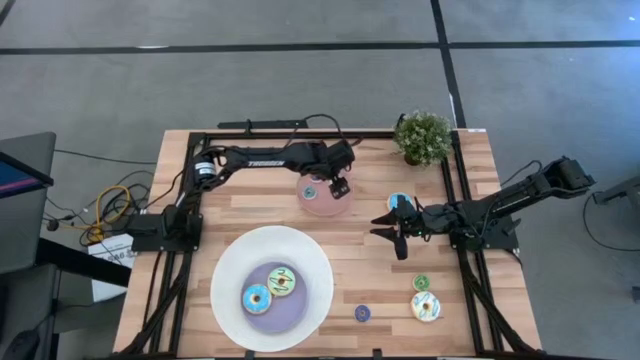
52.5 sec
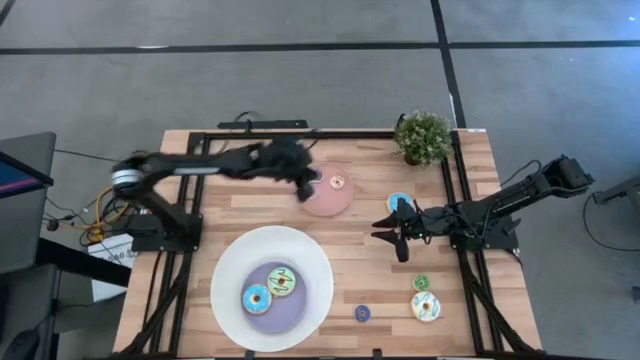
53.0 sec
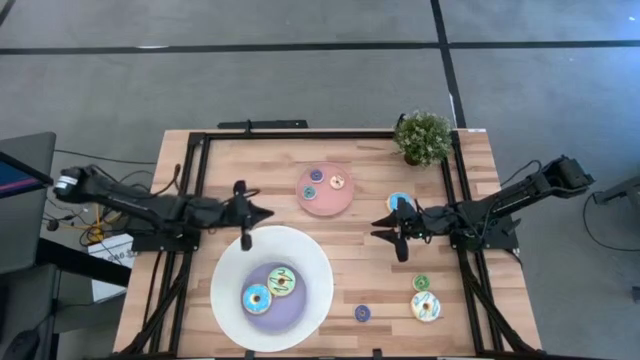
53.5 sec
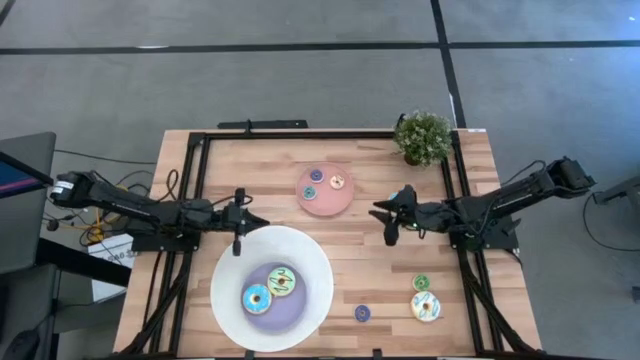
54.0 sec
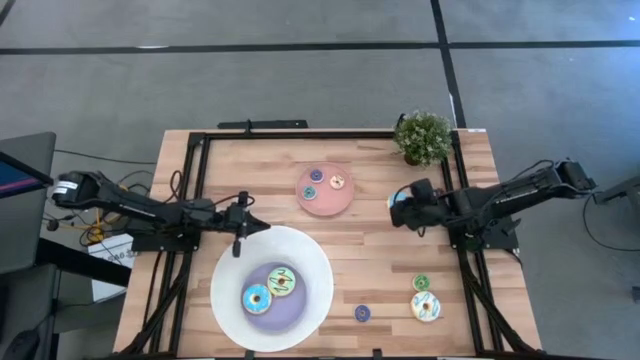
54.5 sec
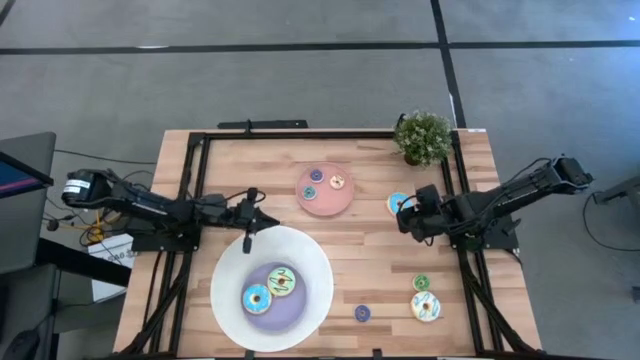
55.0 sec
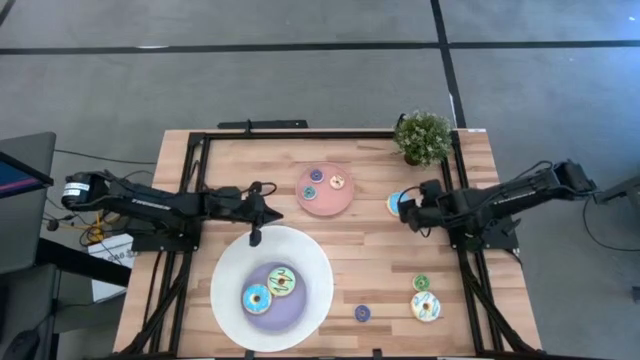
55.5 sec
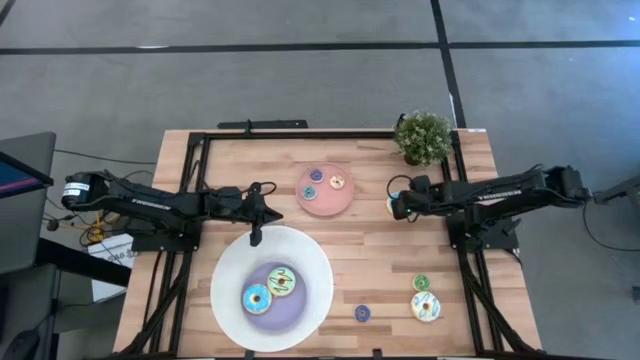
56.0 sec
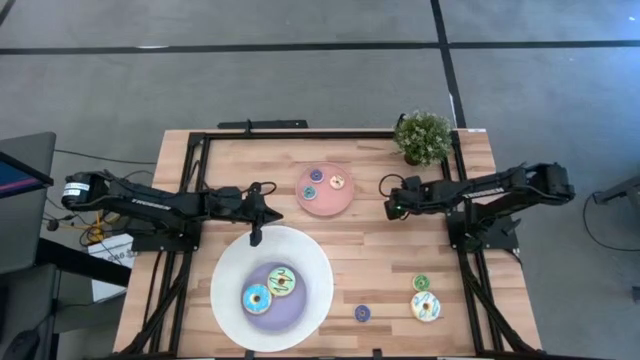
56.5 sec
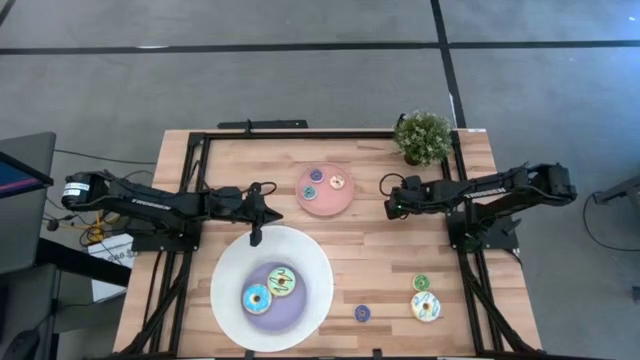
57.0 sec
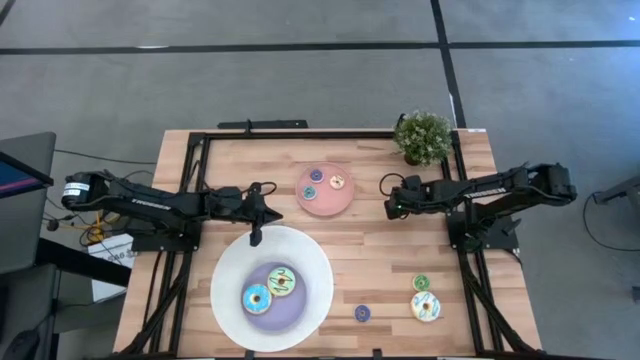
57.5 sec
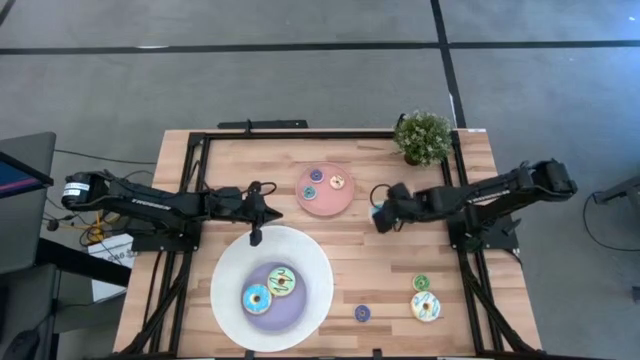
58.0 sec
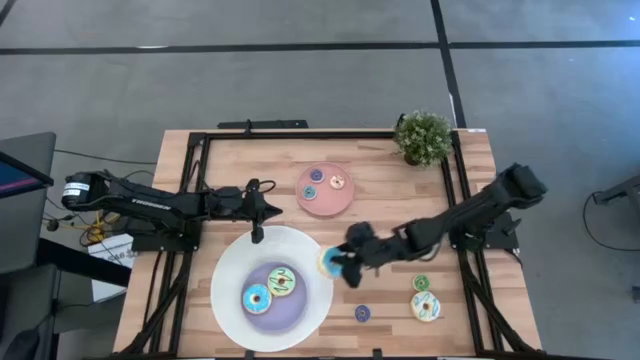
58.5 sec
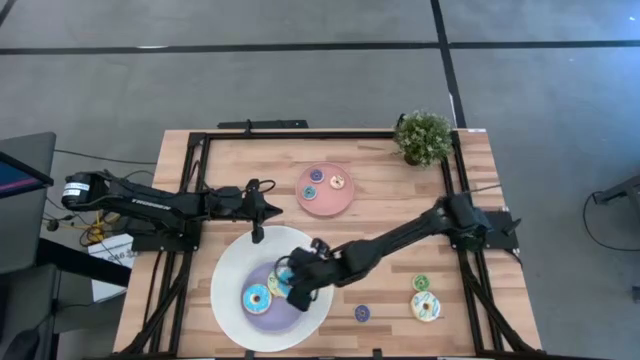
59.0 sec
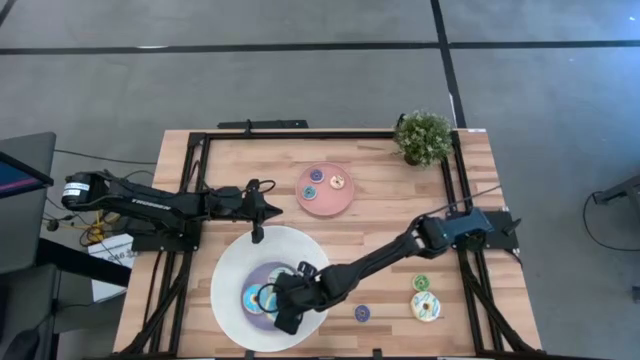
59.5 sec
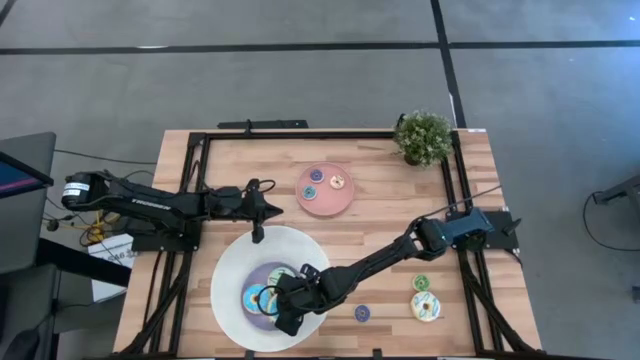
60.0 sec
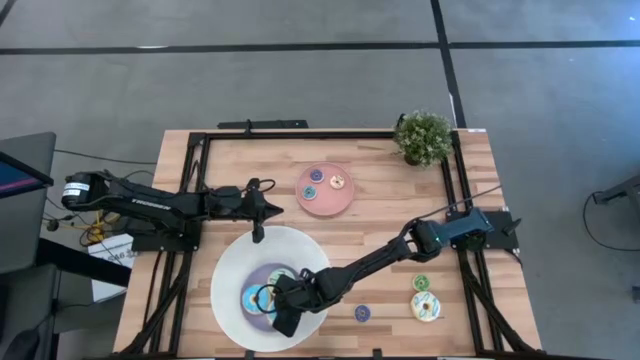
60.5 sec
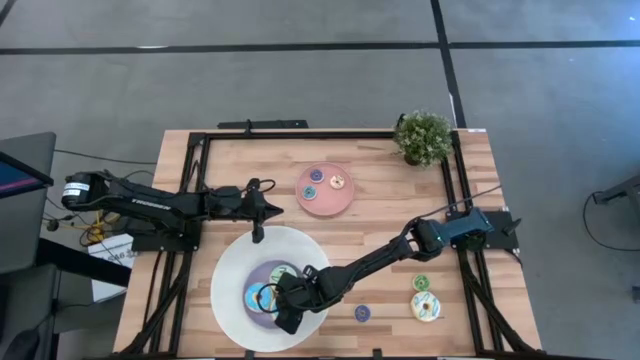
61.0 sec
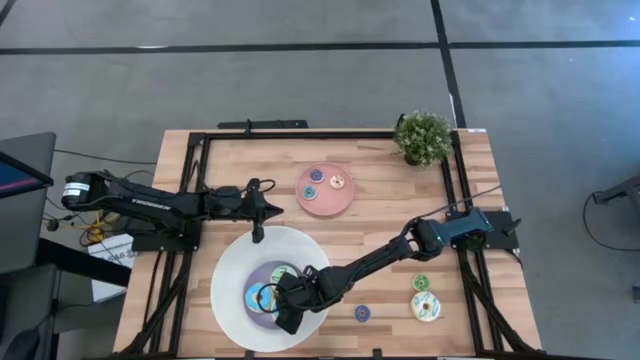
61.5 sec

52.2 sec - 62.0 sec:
Task: Pick & Place donuts
Put the big blue donut on the purple plate

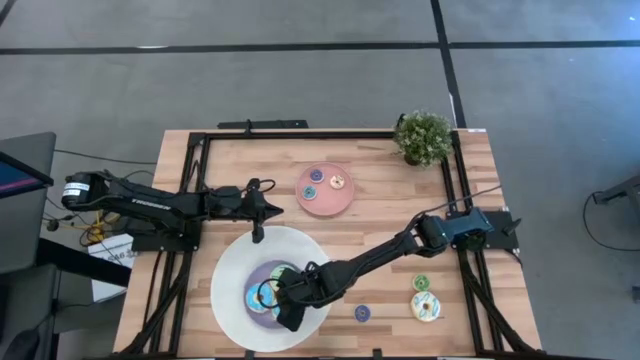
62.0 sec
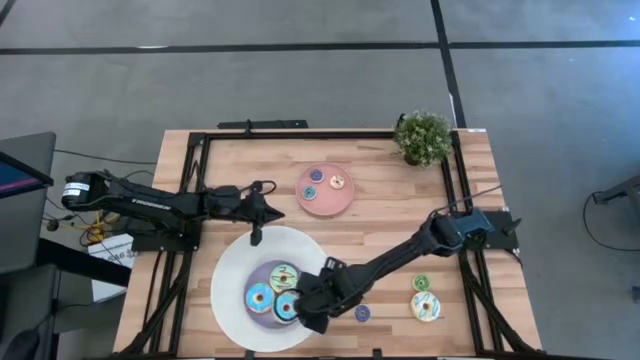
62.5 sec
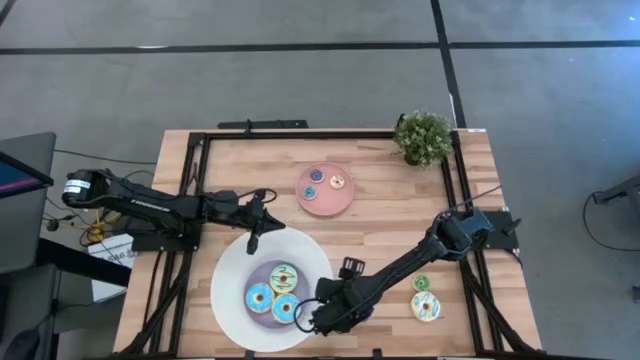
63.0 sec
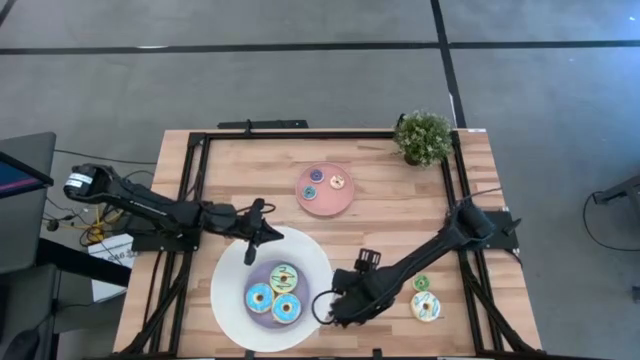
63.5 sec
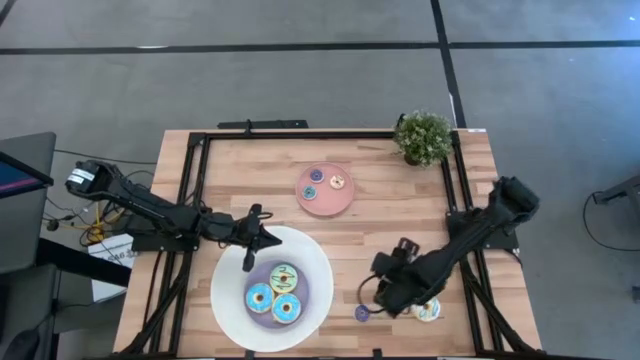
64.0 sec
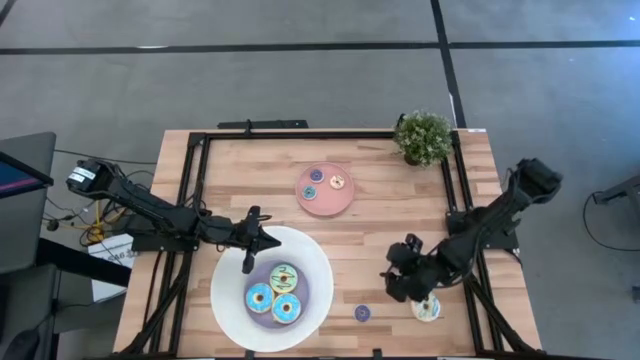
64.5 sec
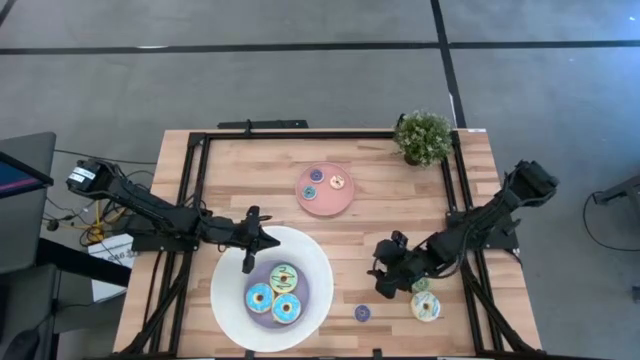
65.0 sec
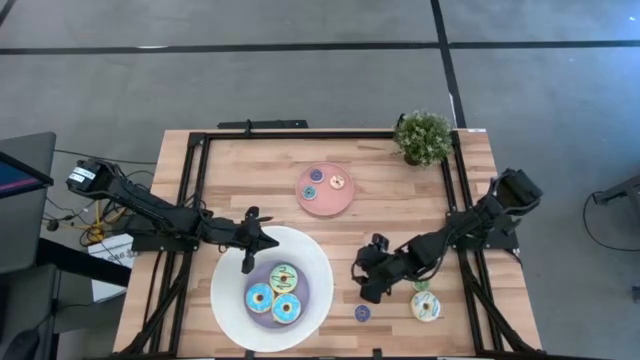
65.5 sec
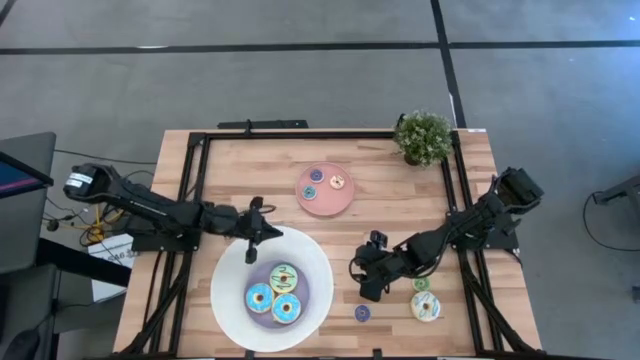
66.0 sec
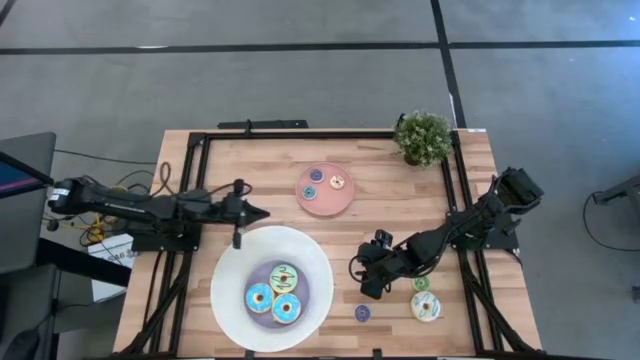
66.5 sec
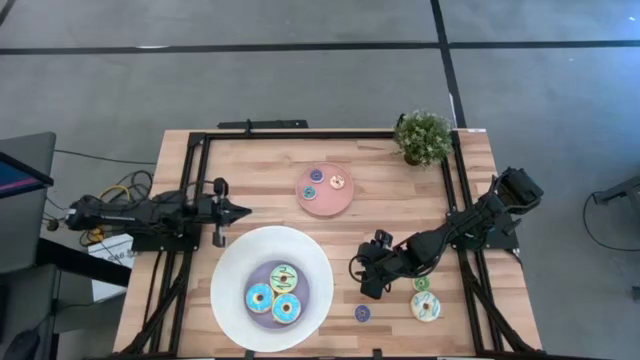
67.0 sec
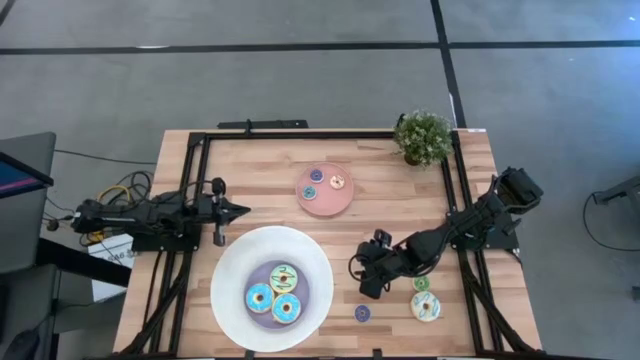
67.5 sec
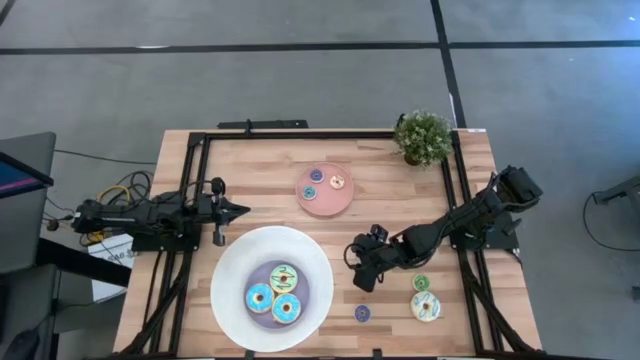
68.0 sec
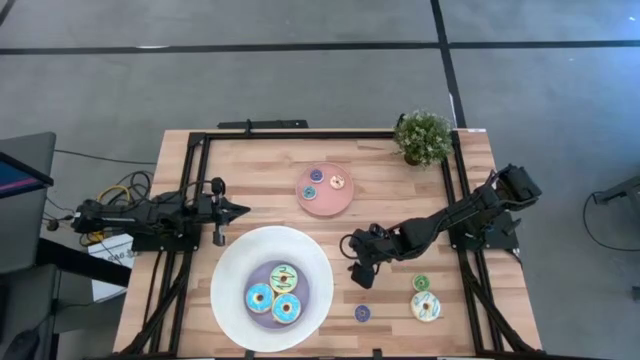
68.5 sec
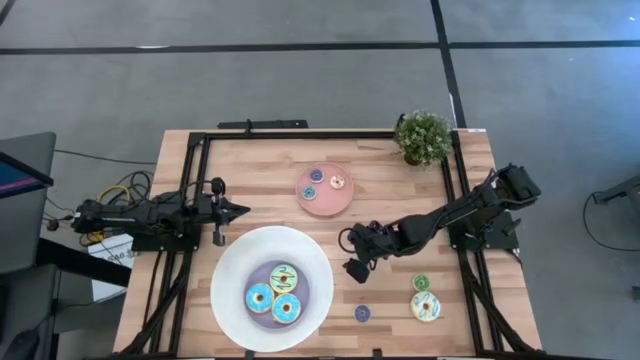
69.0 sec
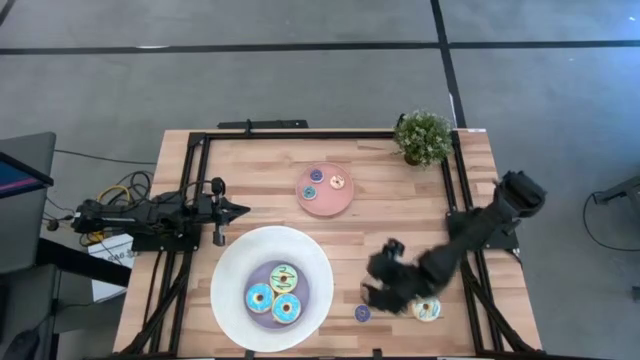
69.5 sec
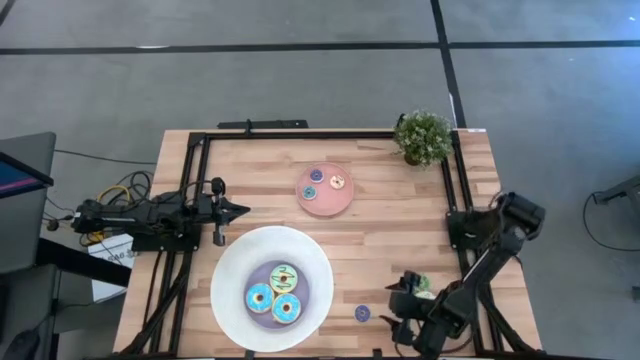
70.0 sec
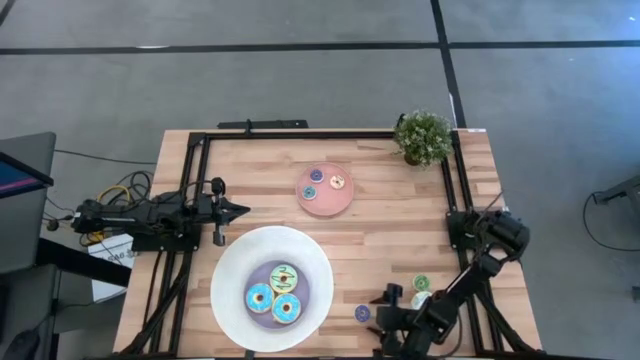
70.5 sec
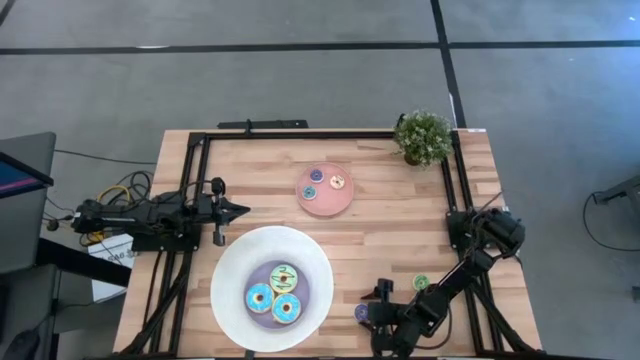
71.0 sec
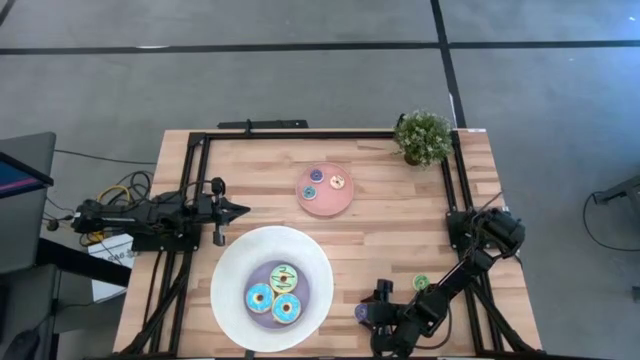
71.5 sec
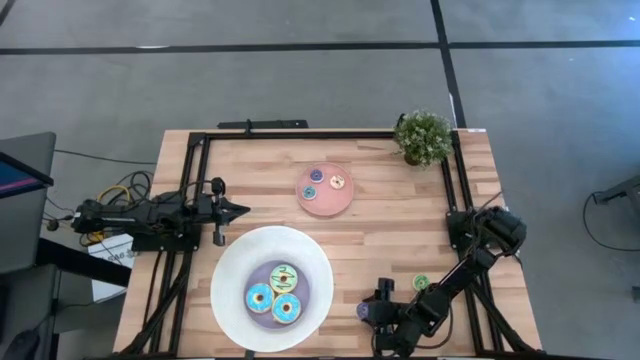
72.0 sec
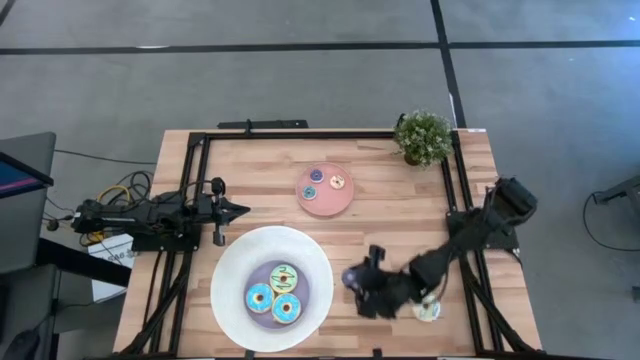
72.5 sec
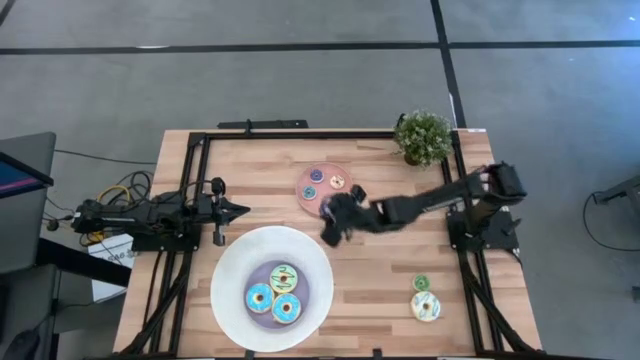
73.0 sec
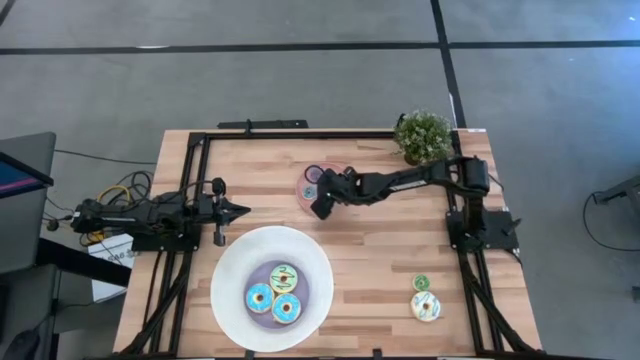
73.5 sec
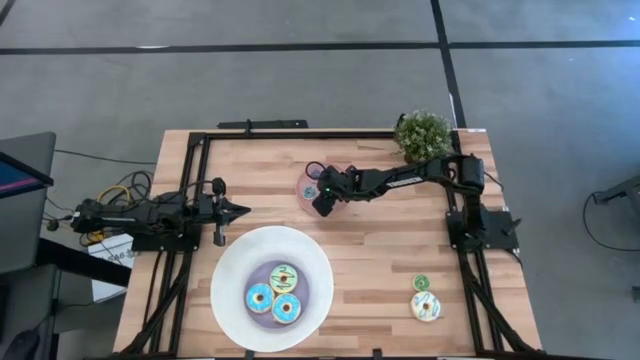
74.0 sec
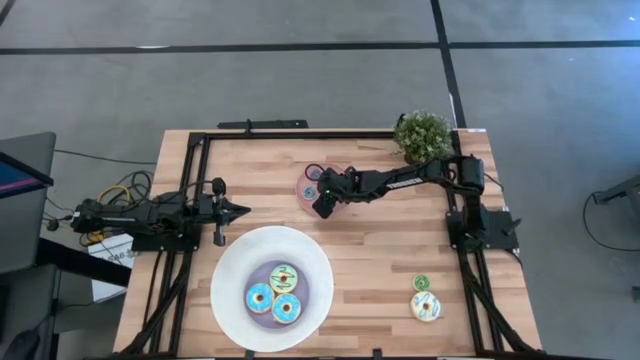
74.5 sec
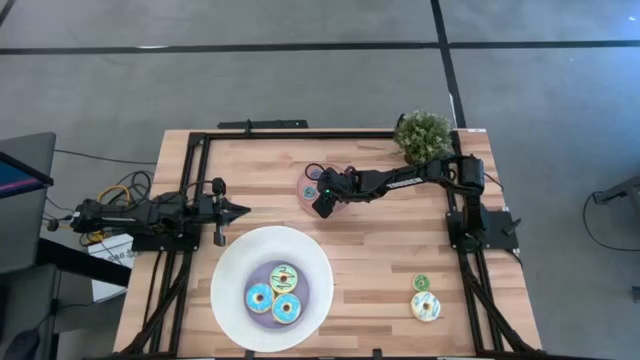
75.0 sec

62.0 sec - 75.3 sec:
Put the small blue donut on the pink plate
